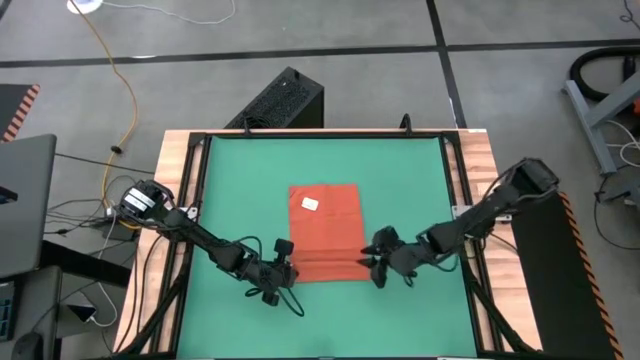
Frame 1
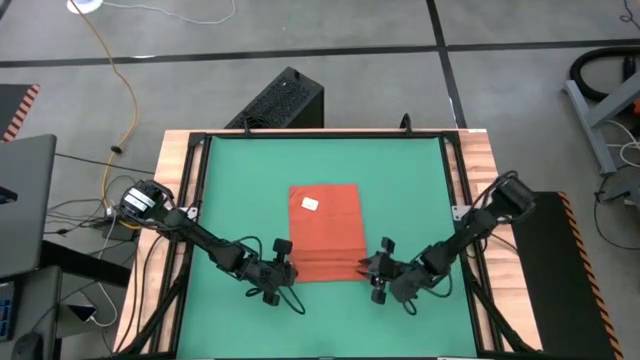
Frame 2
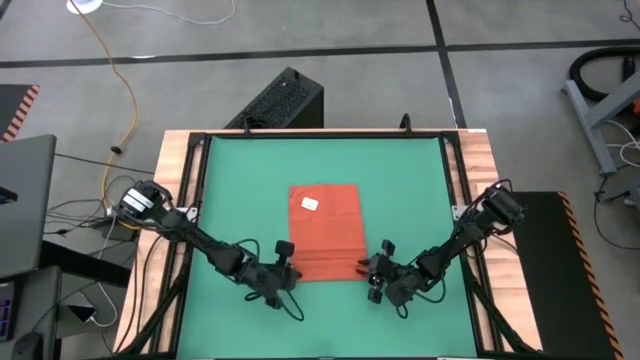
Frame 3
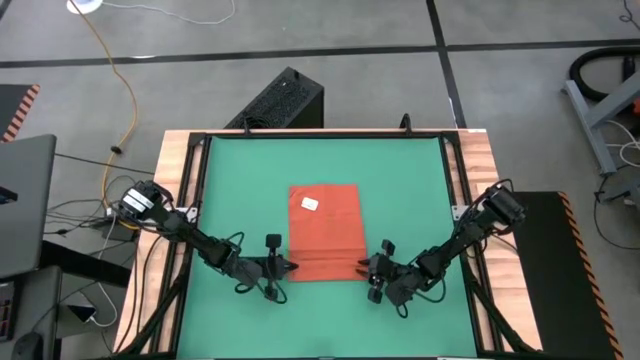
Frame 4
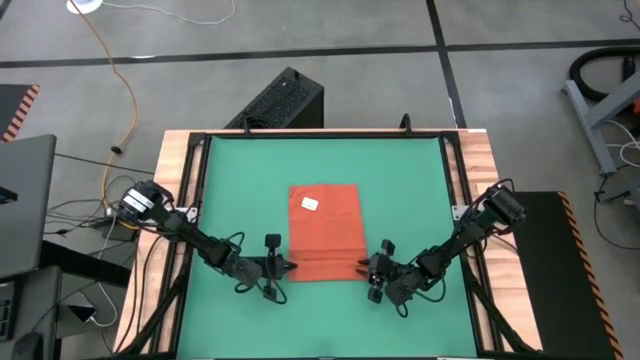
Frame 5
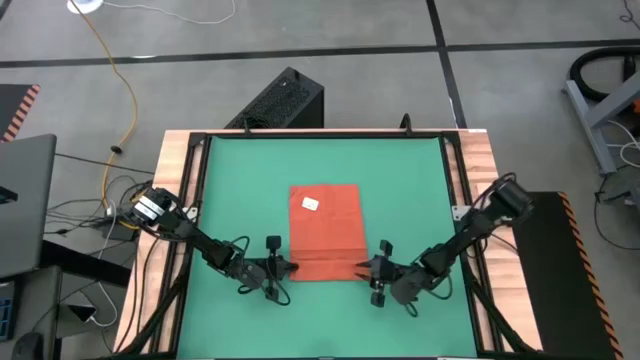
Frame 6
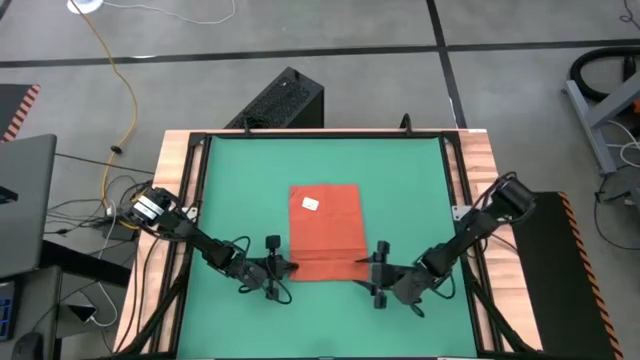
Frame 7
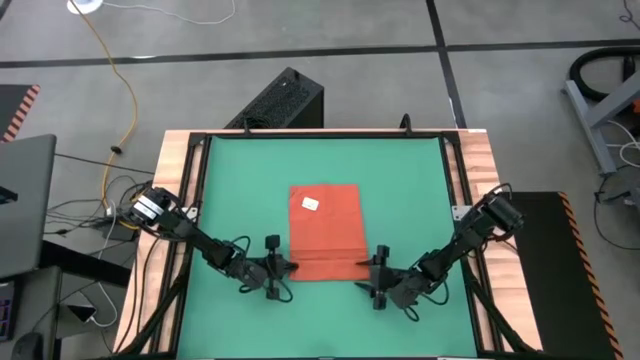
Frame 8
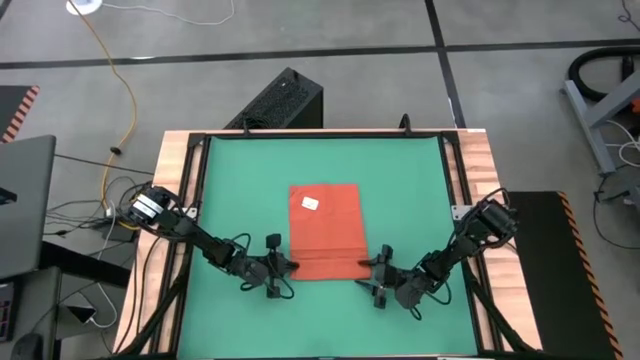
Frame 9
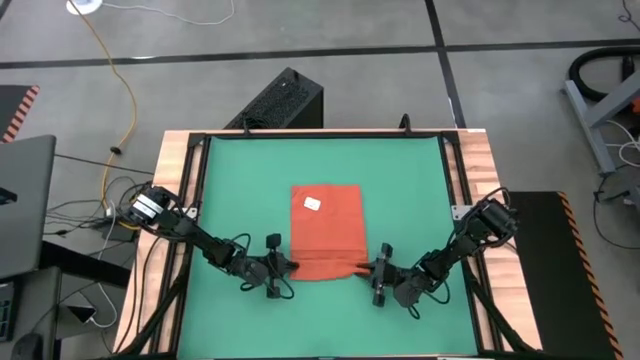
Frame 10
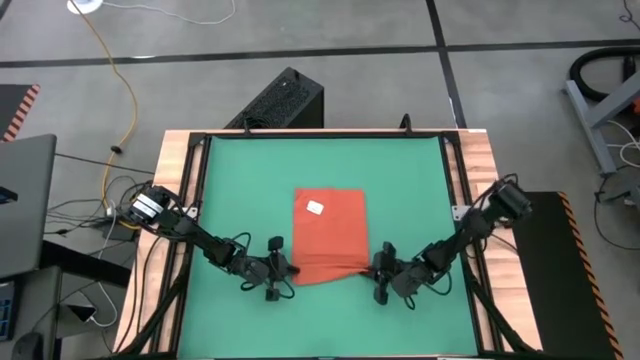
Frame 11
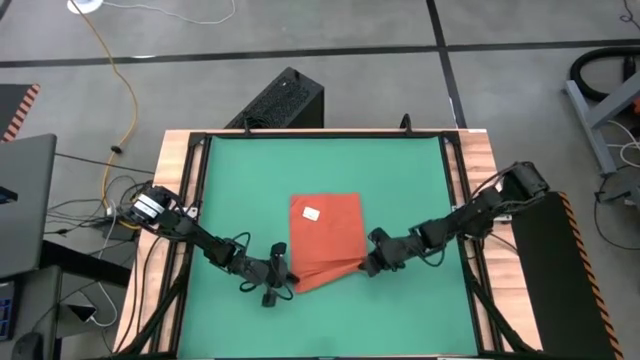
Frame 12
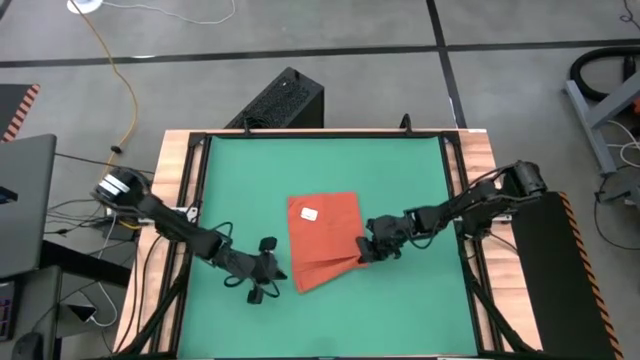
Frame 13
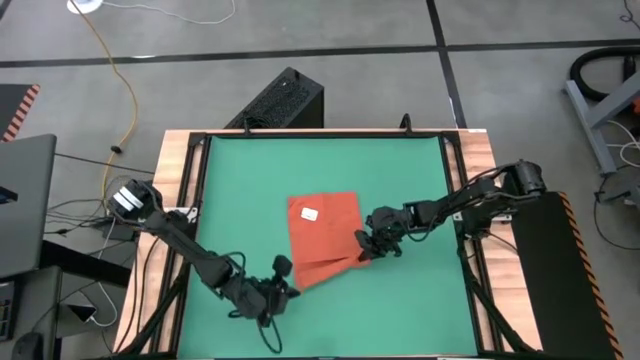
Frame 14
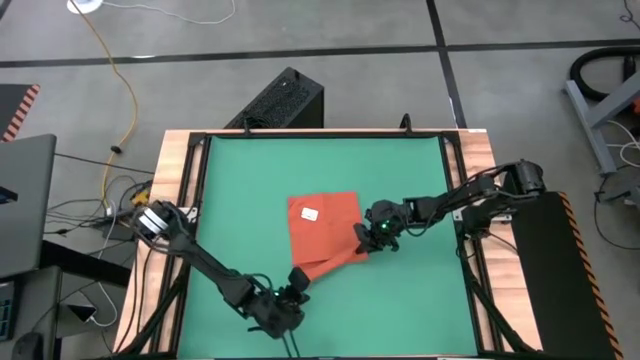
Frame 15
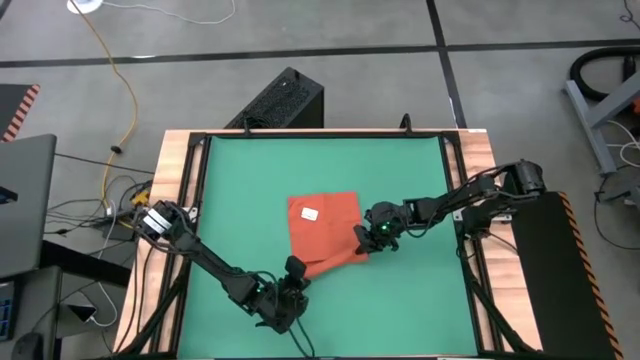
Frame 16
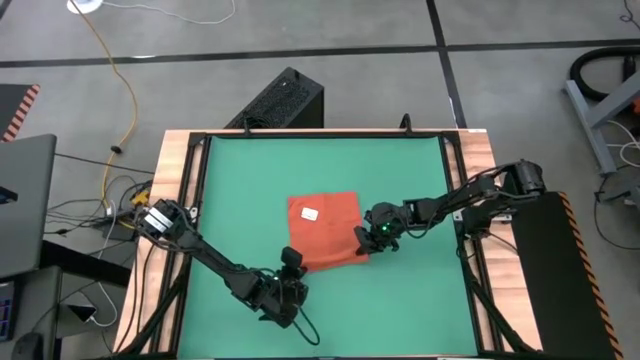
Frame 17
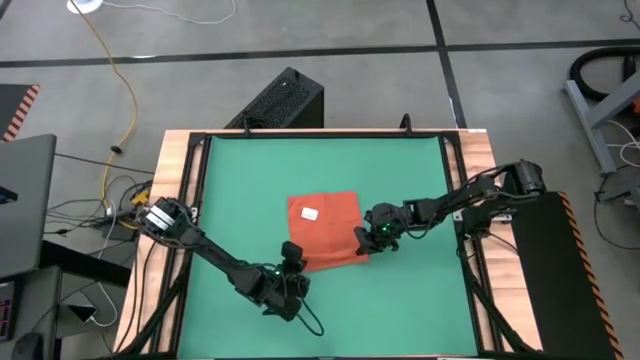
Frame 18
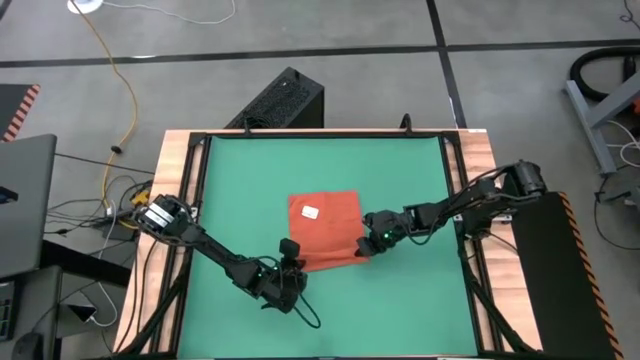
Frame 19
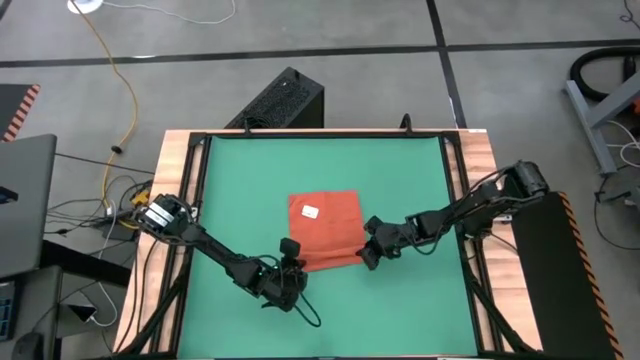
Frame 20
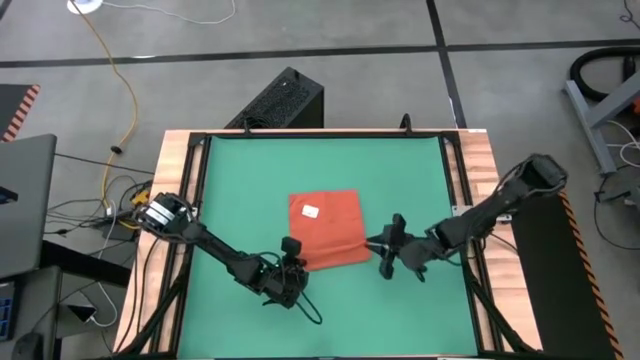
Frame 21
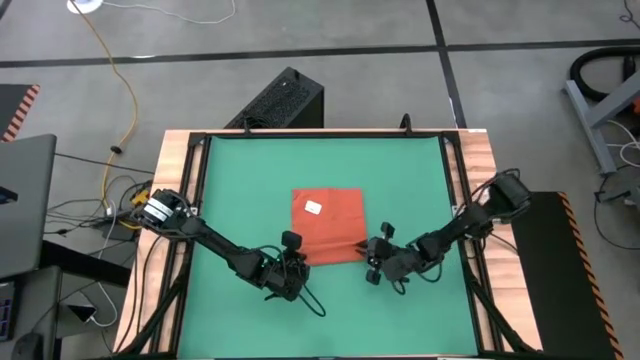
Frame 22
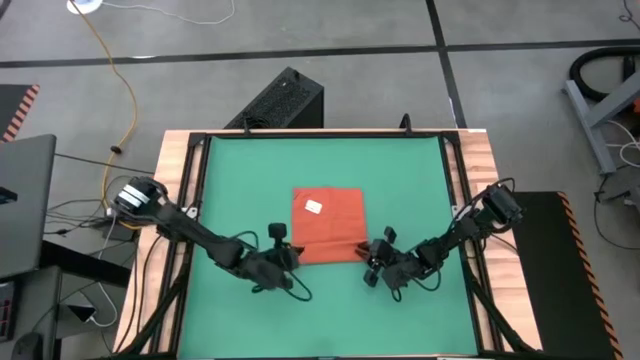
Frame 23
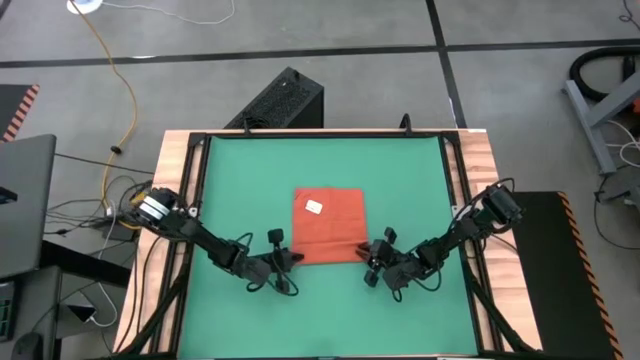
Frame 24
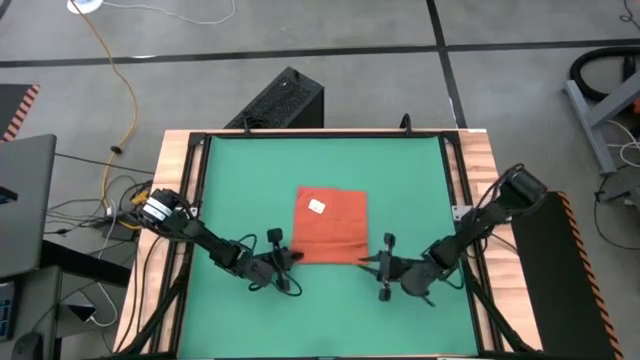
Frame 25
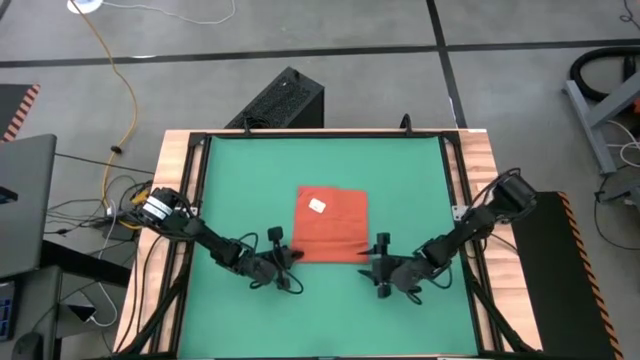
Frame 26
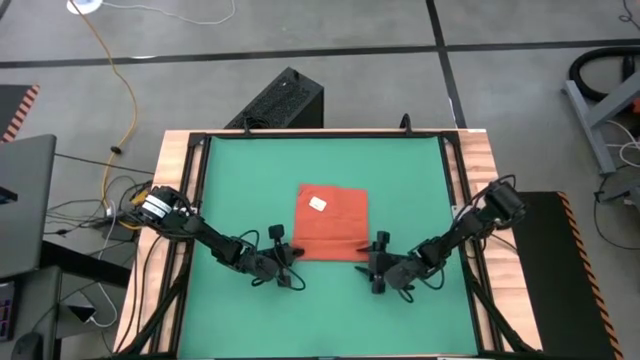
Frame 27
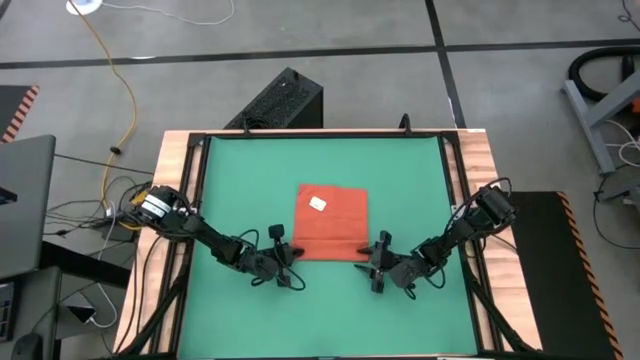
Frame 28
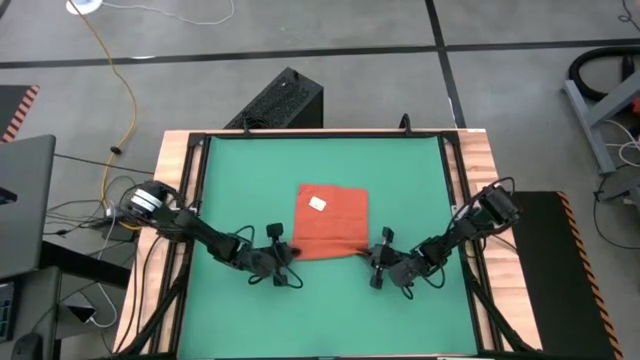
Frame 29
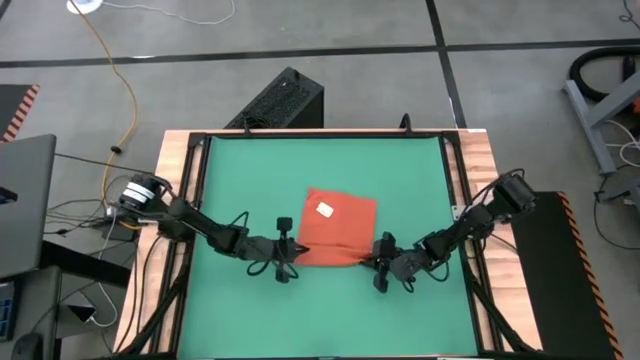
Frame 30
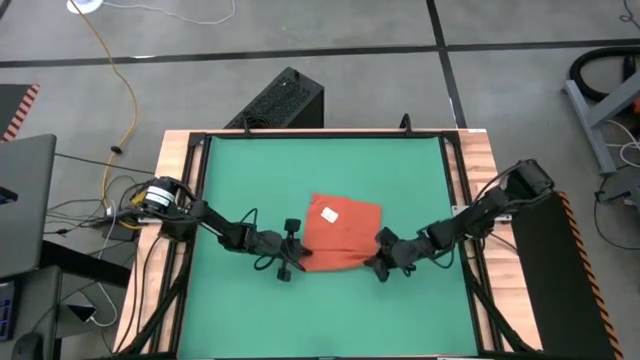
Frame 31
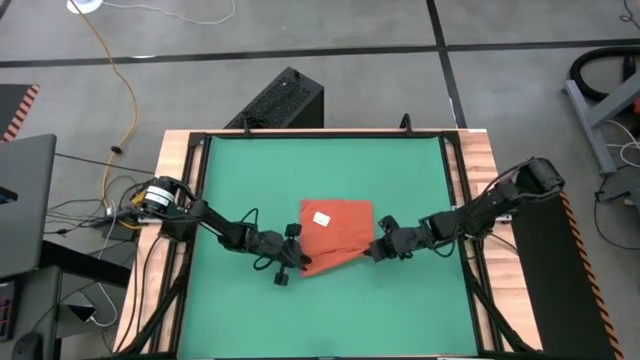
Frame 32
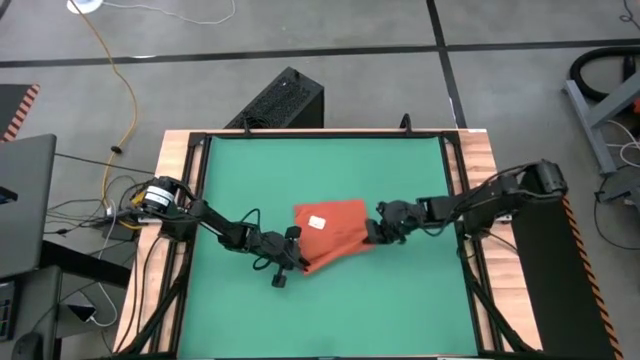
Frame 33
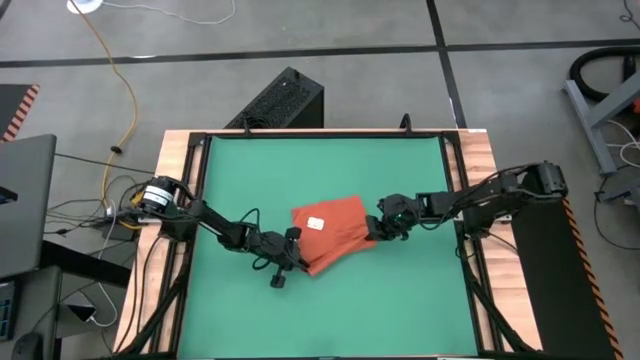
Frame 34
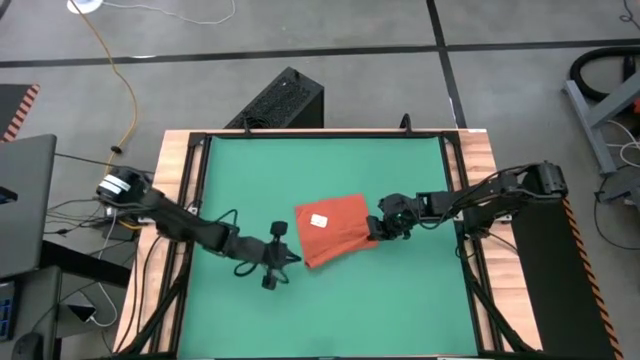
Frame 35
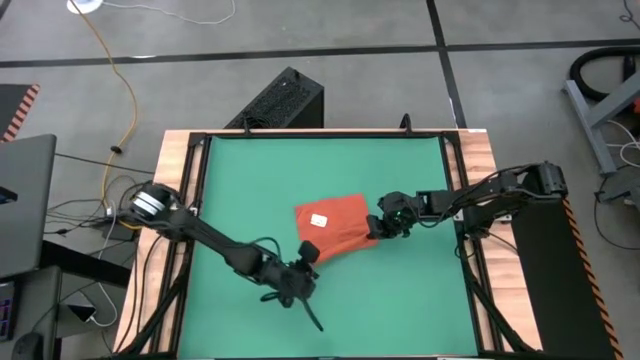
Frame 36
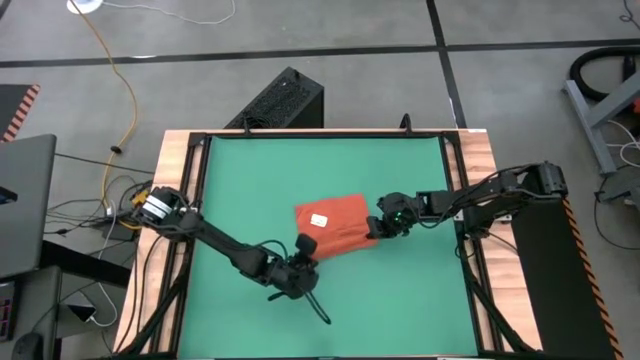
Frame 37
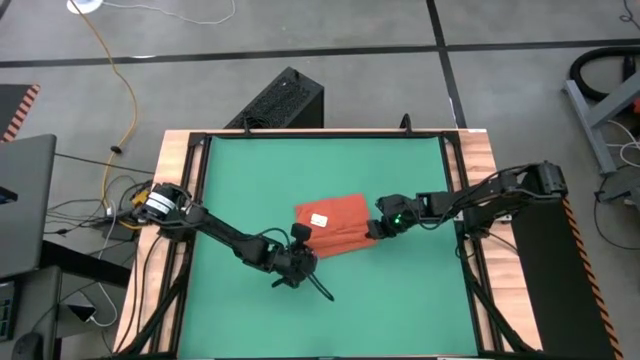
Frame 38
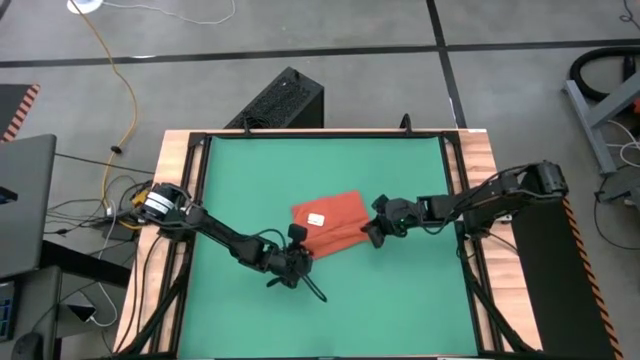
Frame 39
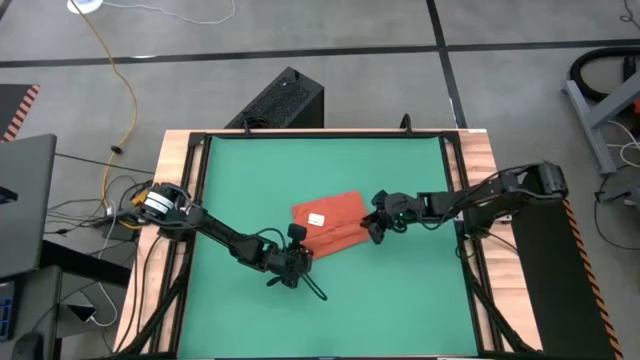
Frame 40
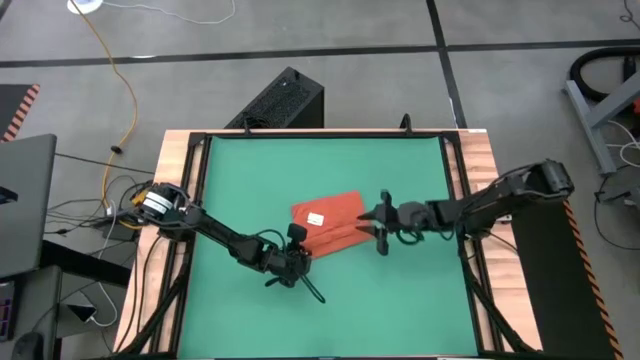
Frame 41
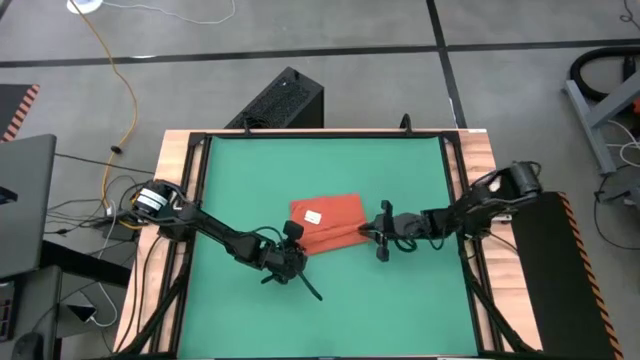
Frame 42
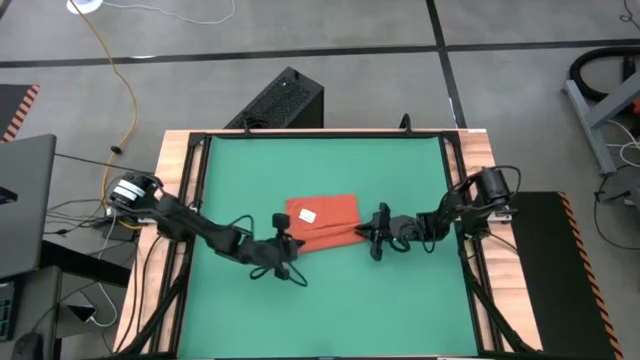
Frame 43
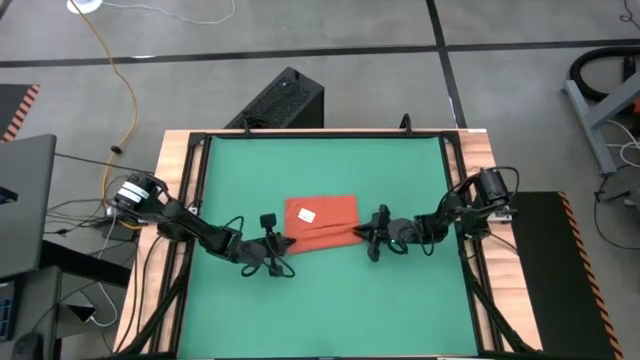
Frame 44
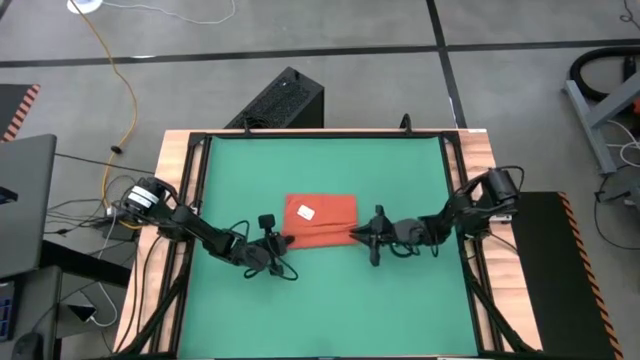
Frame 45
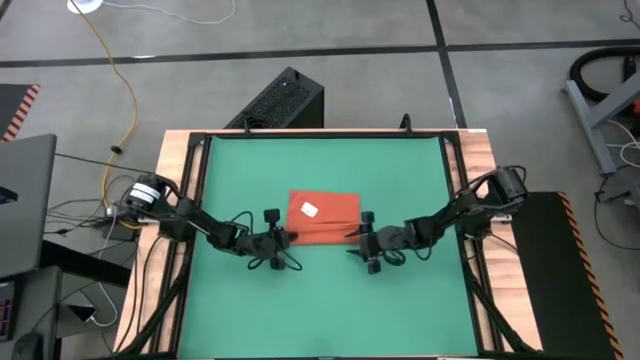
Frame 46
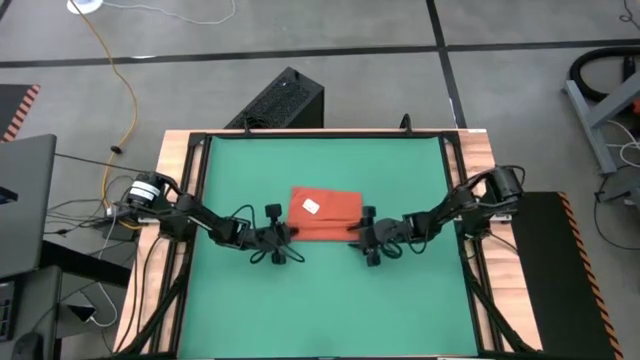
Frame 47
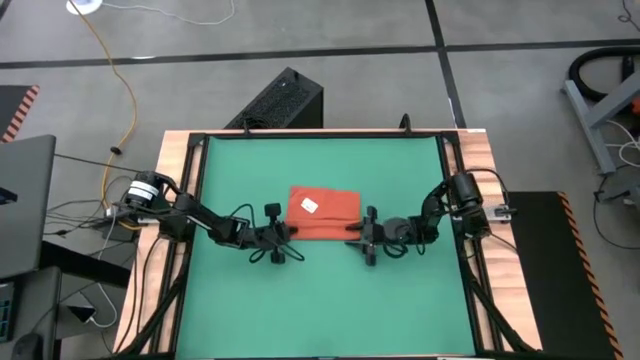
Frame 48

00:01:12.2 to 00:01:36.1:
Task: Roll towel
Roll the orange towel
